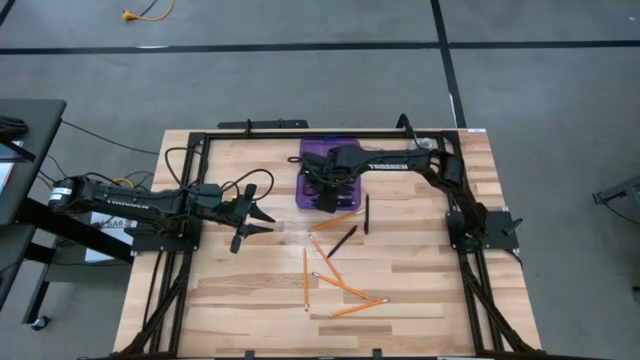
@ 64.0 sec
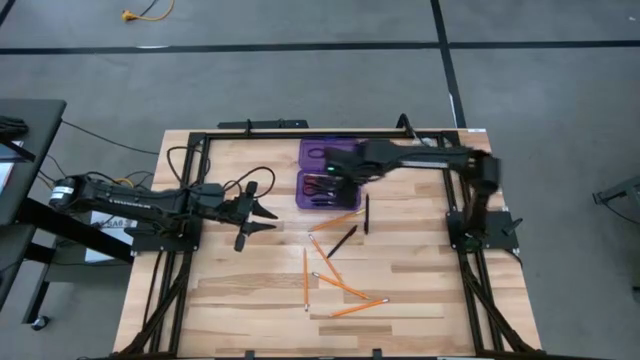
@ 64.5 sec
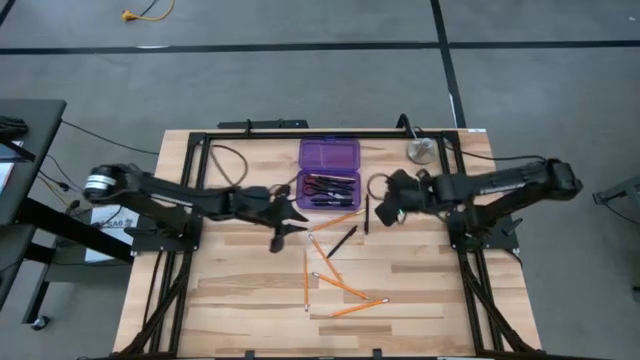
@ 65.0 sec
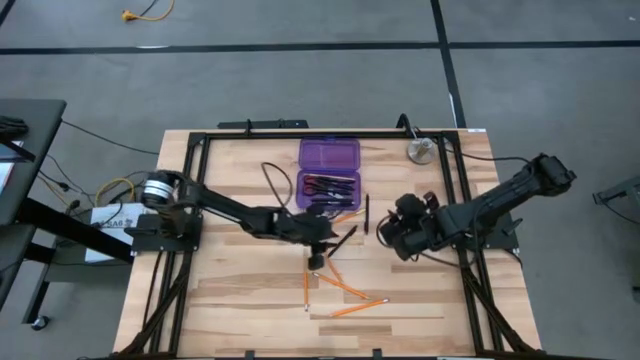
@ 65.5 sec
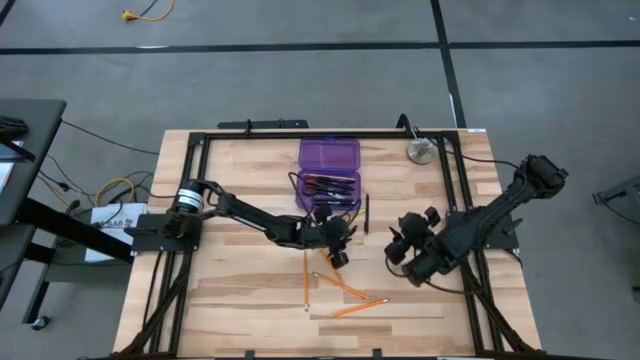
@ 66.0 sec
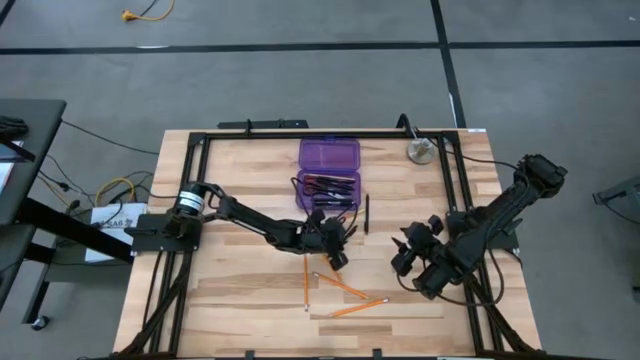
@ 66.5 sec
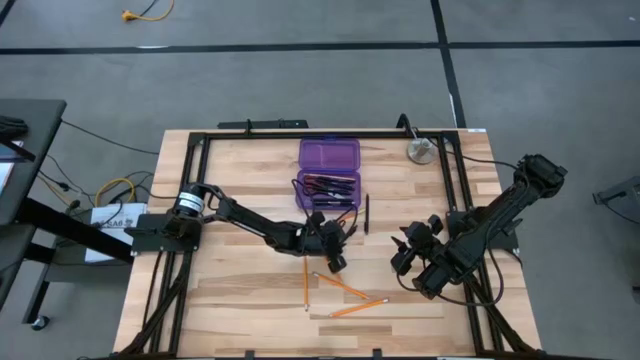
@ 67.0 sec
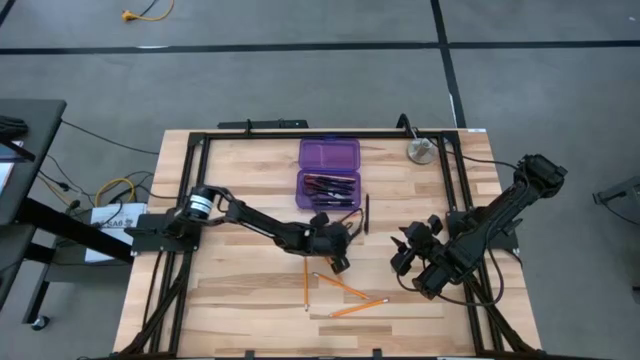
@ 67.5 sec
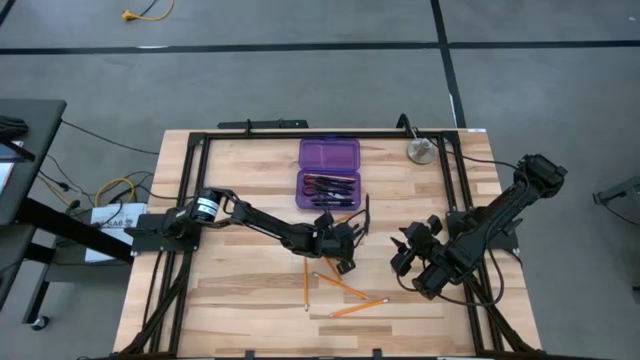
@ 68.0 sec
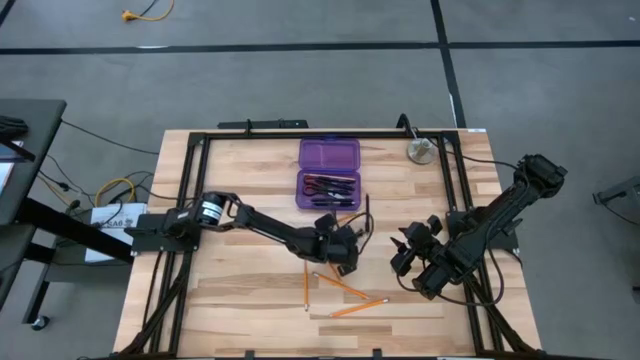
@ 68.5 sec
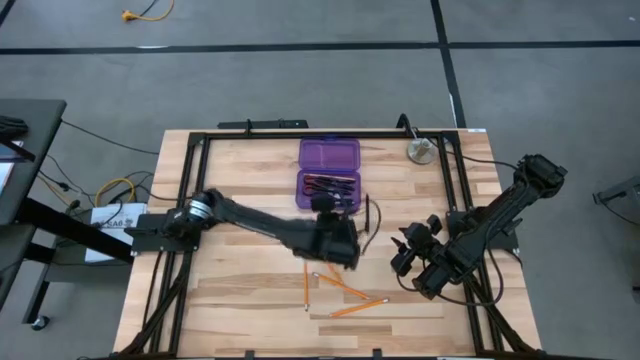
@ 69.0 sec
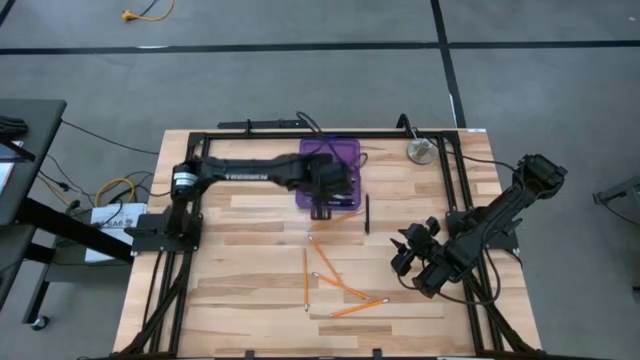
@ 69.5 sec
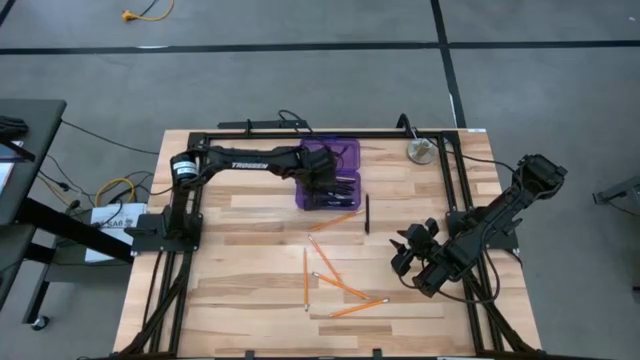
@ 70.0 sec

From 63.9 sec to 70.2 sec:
Task: Pick & place school supplies into a supply box
Put the black pen into the violet supply box

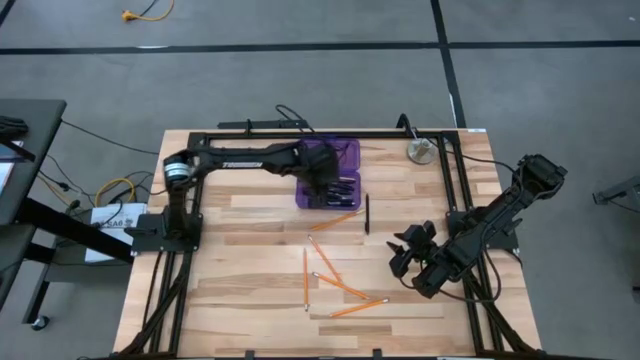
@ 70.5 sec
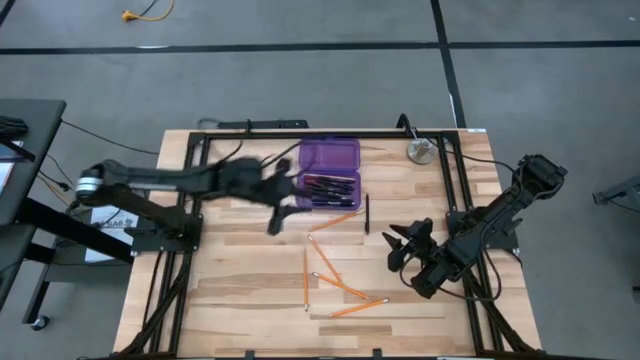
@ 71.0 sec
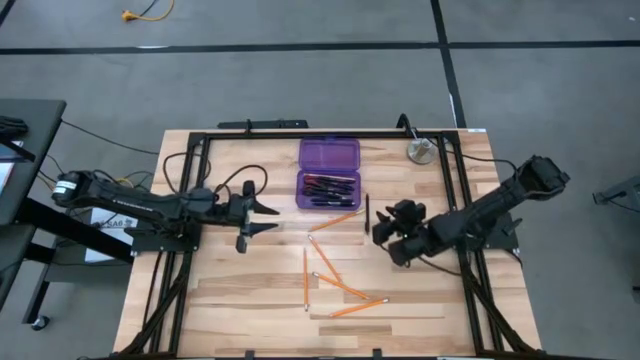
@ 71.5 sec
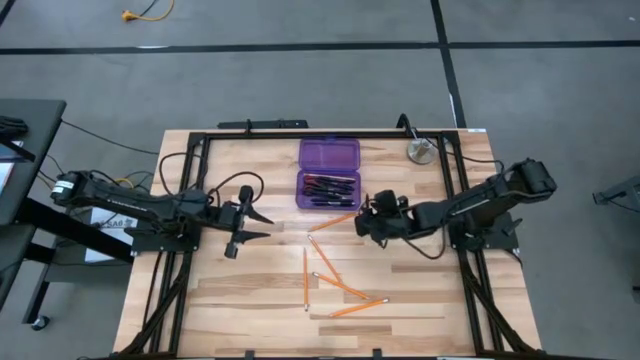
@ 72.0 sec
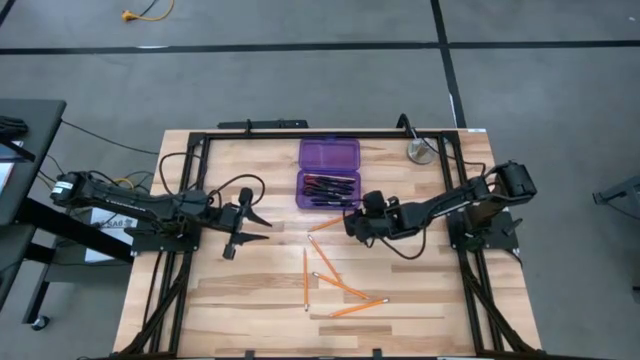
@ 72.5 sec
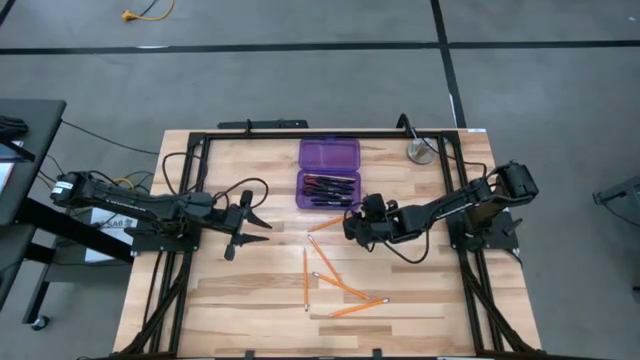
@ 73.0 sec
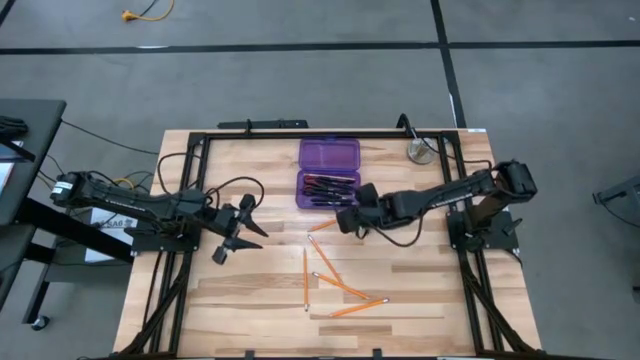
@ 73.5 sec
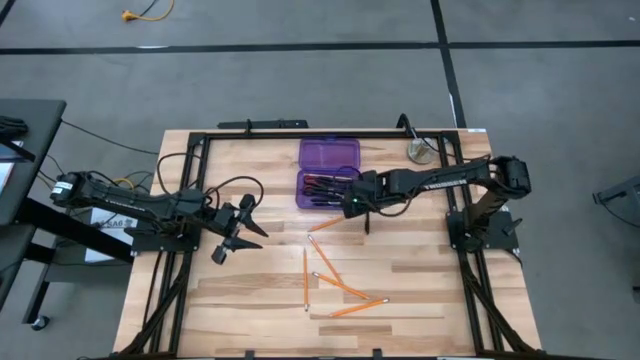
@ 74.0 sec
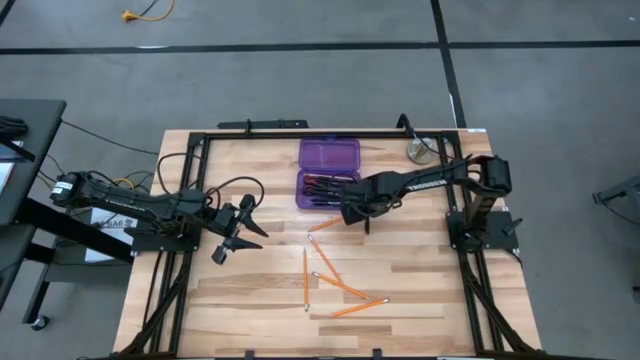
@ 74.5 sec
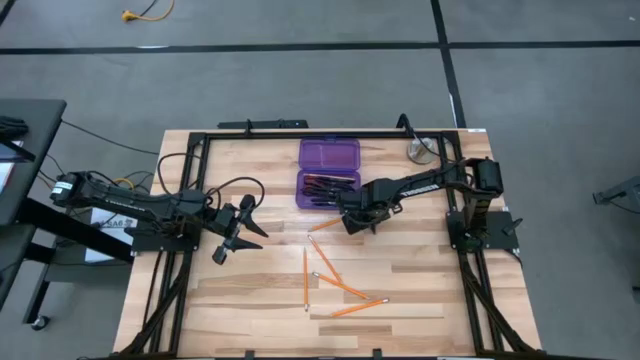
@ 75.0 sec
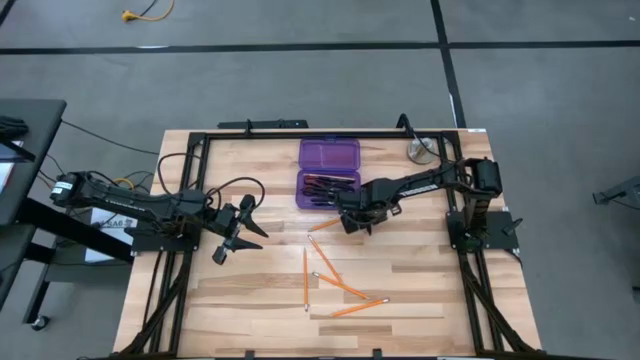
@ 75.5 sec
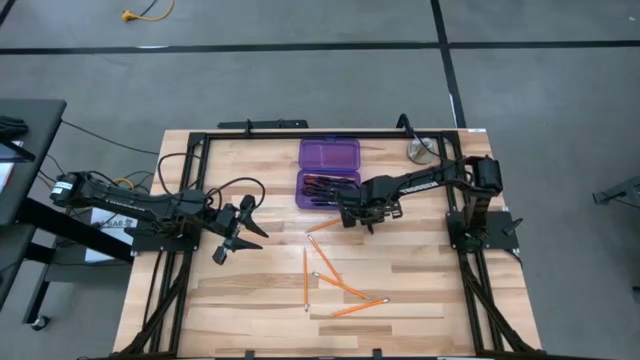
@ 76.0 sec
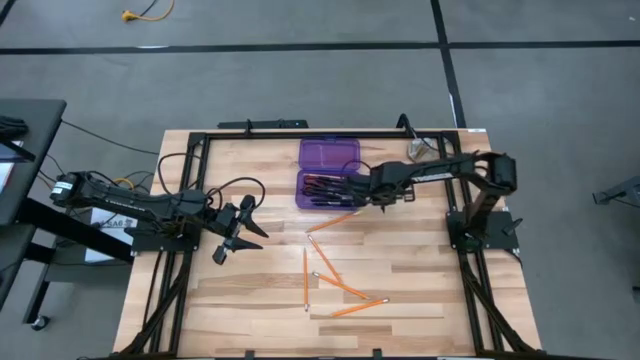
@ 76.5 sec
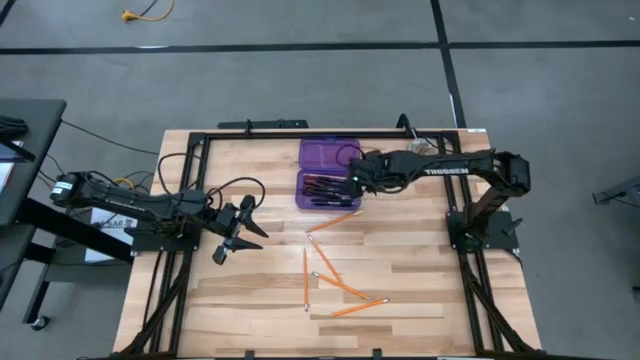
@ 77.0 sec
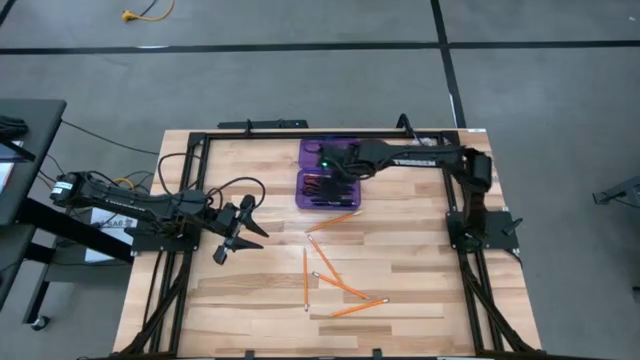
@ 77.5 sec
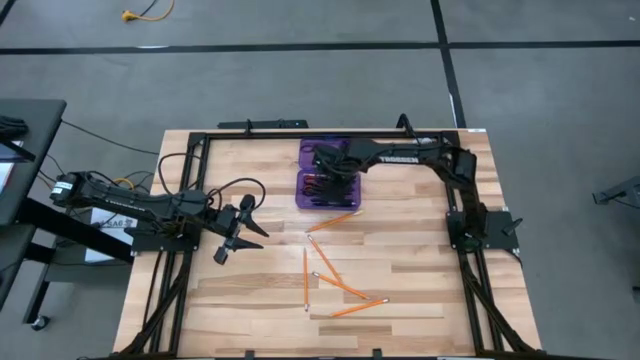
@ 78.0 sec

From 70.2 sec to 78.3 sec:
Put the black pen into the violet supply box

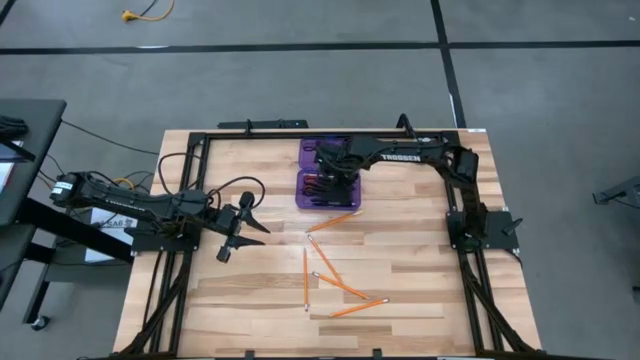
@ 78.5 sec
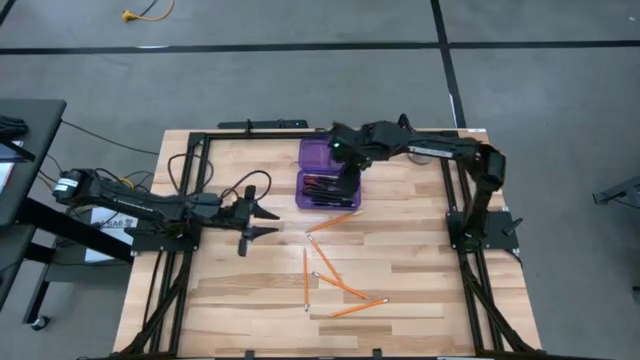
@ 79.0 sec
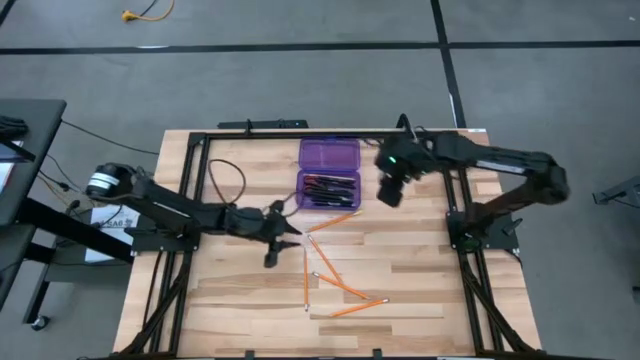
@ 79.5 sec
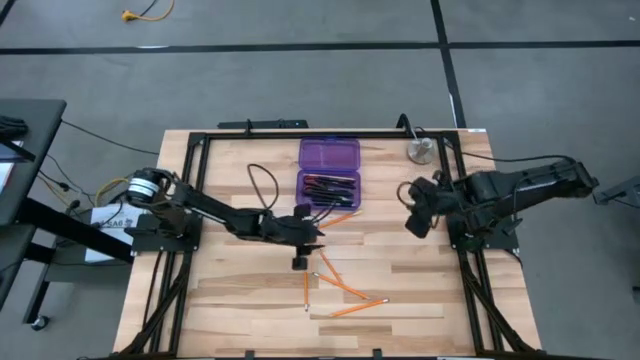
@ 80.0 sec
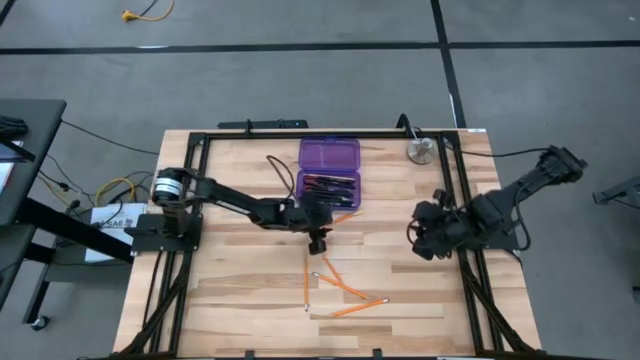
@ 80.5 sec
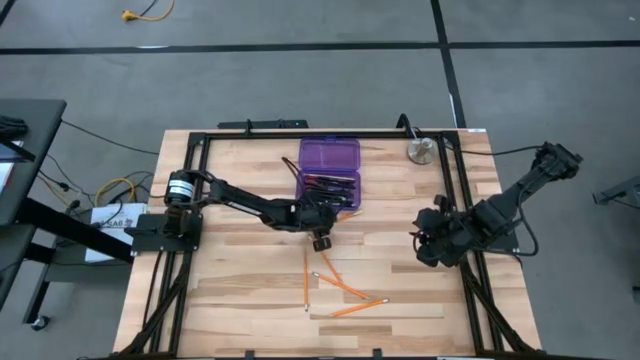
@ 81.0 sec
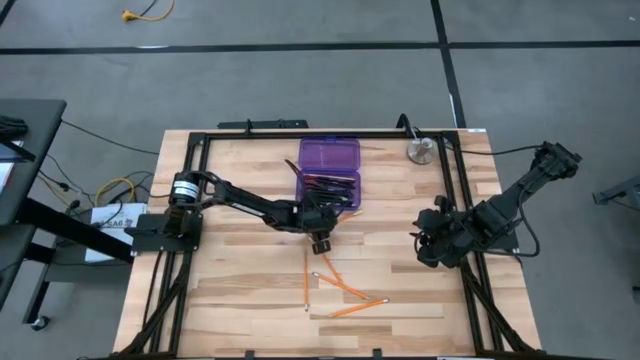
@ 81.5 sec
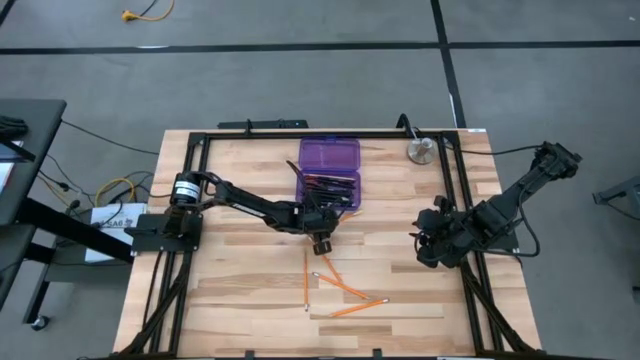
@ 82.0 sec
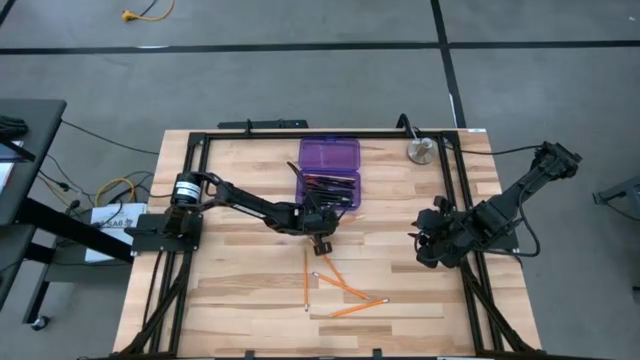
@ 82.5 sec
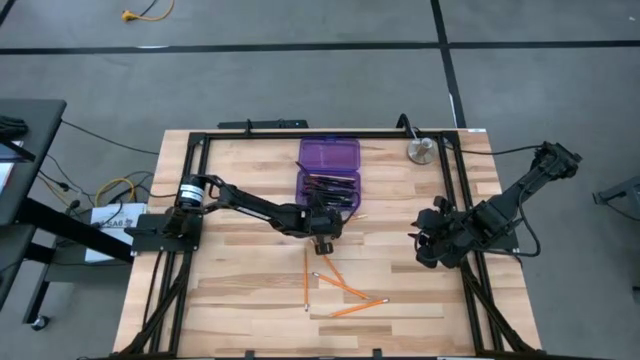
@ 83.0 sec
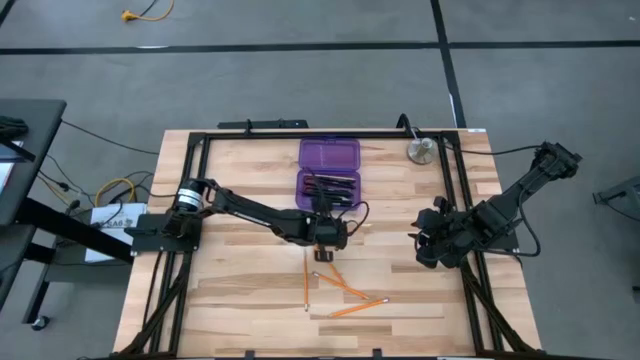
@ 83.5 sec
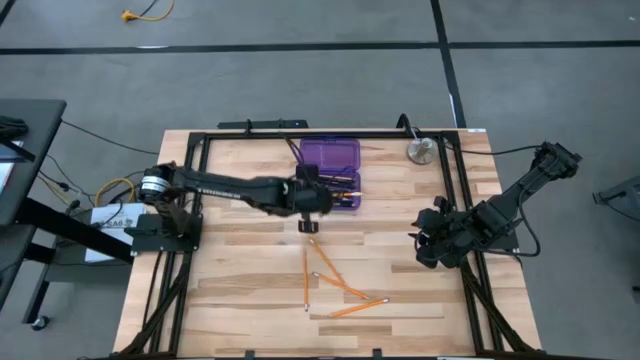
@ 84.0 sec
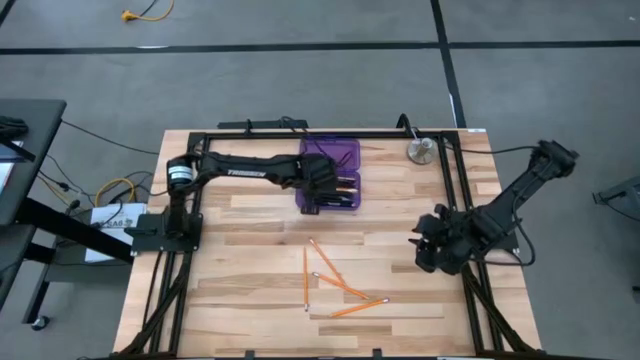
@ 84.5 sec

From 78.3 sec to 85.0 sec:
Put the orange pencil into the violet supply box
